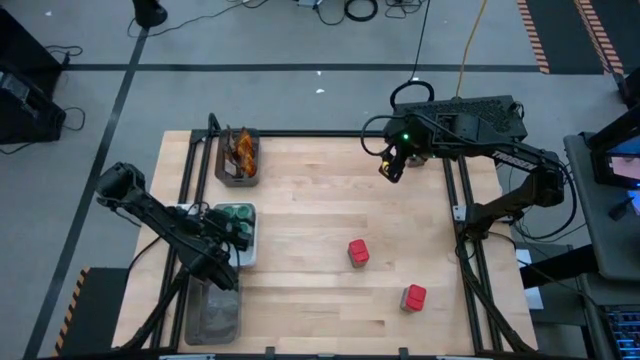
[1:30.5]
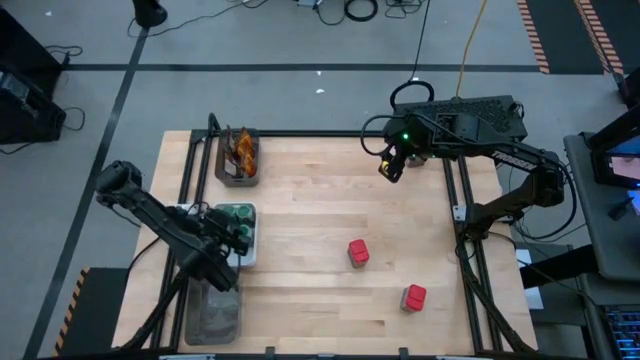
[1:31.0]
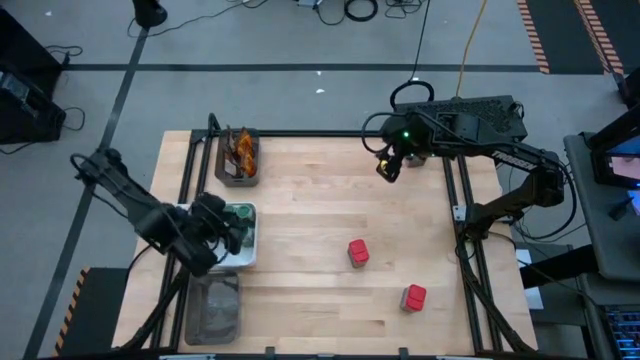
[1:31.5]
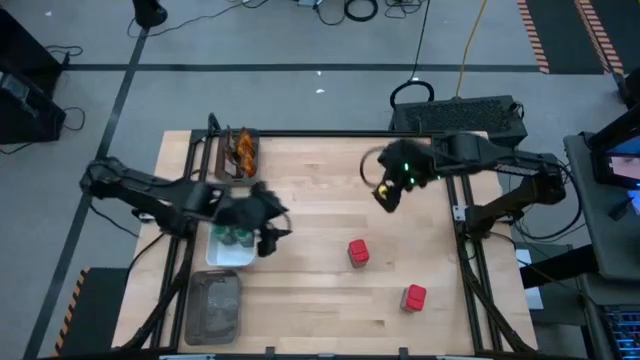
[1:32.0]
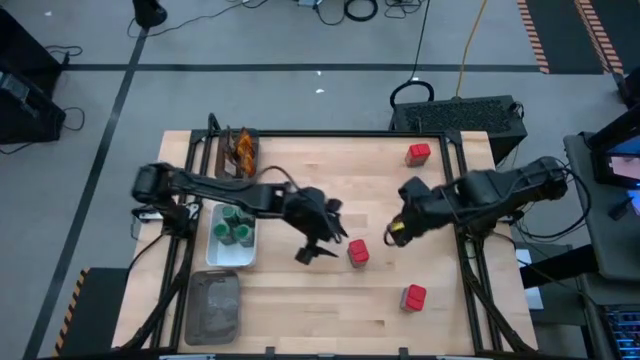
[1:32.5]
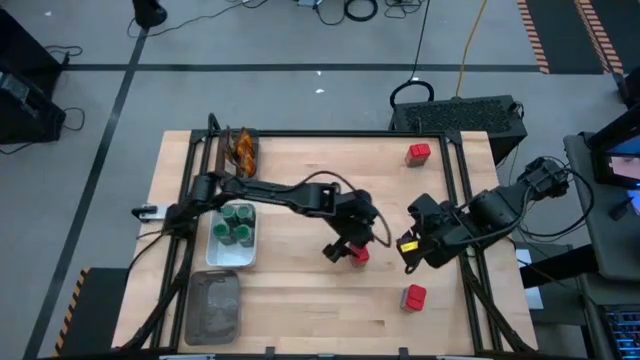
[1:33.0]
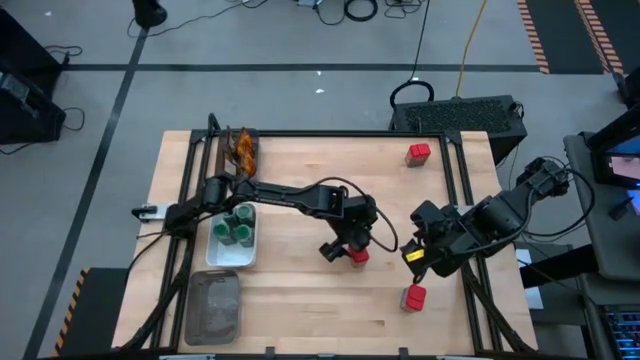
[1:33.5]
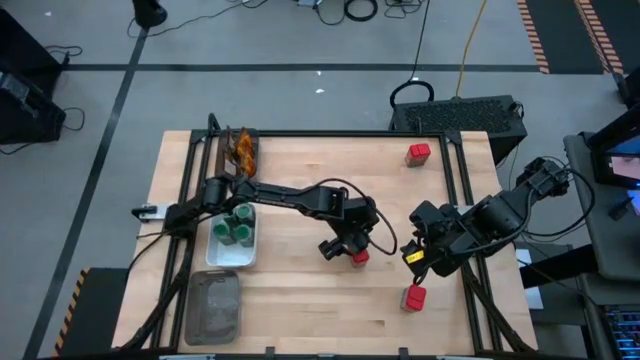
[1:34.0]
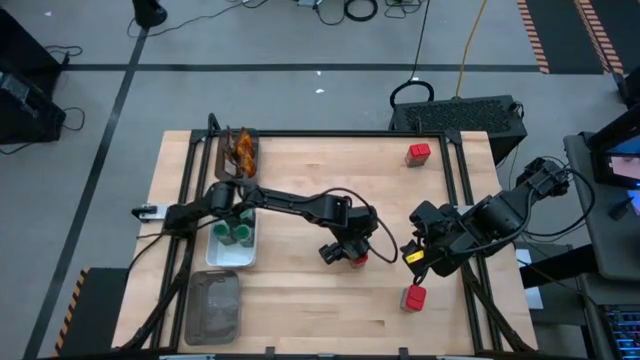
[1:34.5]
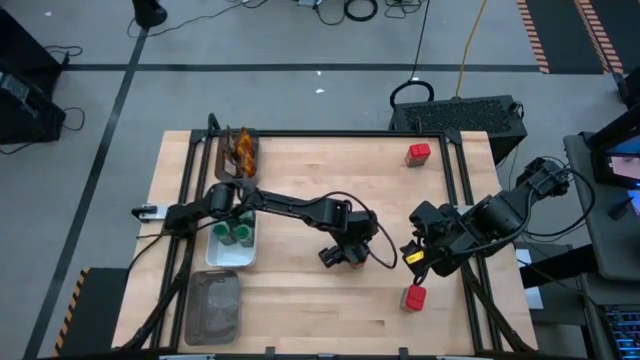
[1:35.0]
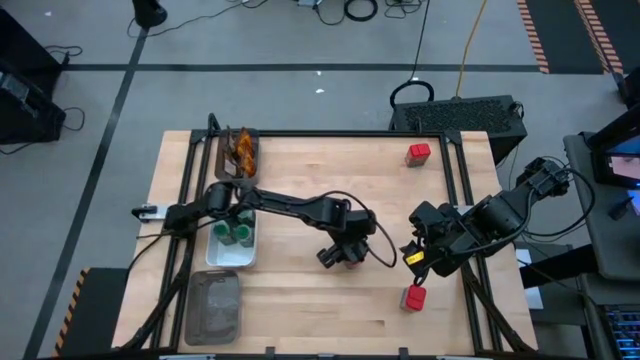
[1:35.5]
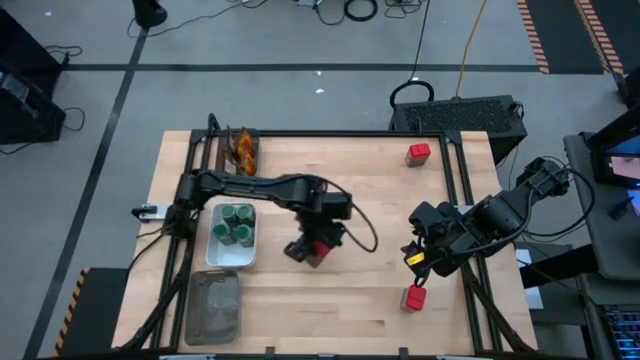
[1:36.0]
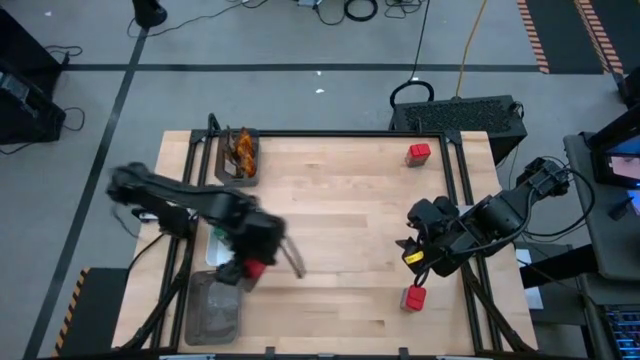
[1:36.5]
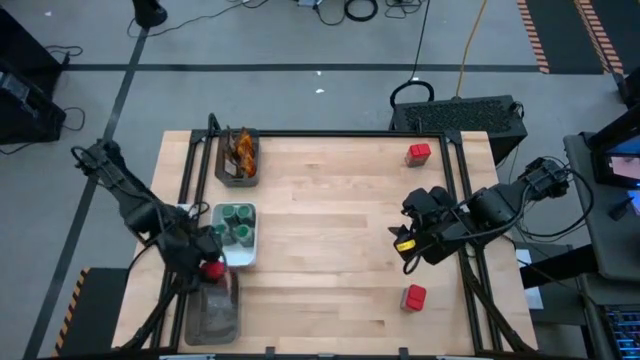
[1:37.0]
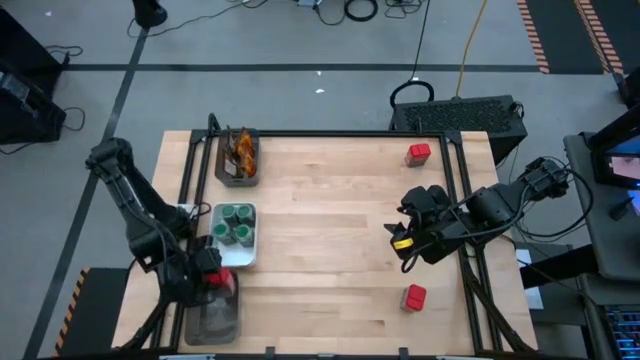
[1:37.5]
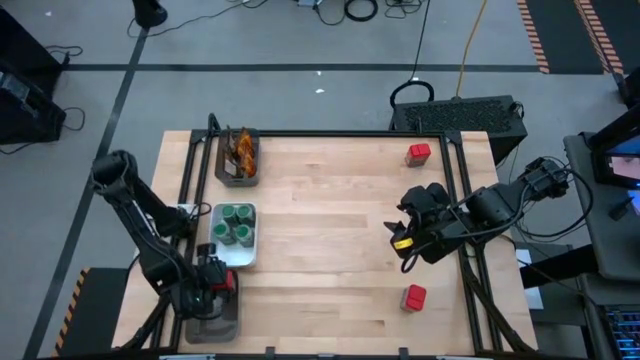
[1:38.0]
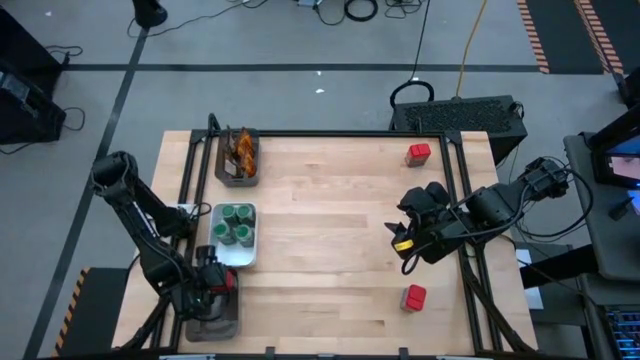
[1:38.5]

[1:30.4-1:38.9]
Task: Sort spices by type
Put the middle red seasoning can into the bottom black bin

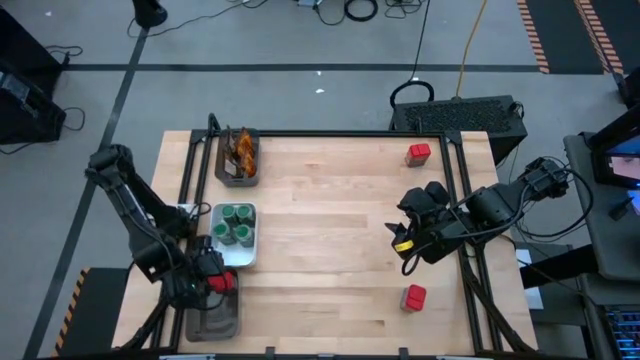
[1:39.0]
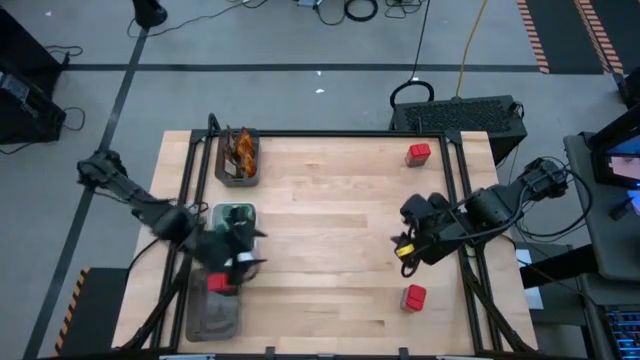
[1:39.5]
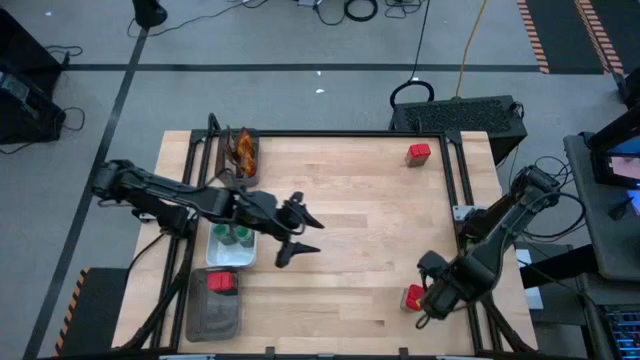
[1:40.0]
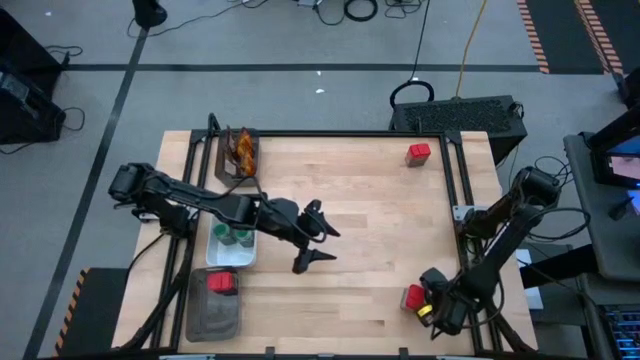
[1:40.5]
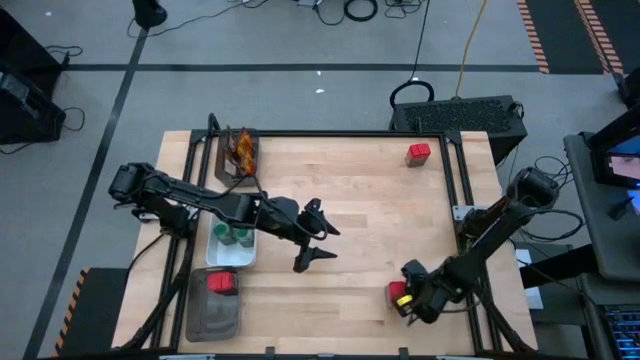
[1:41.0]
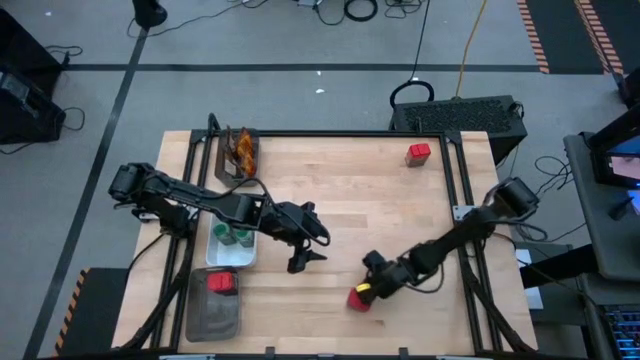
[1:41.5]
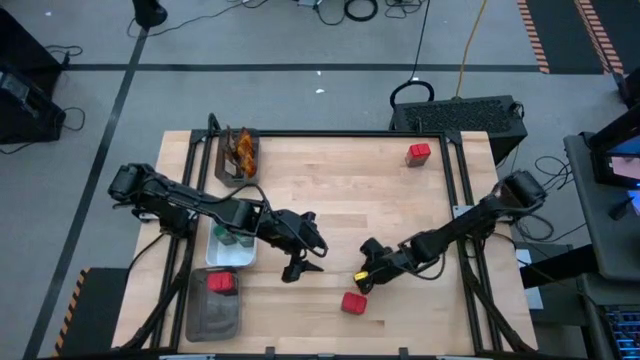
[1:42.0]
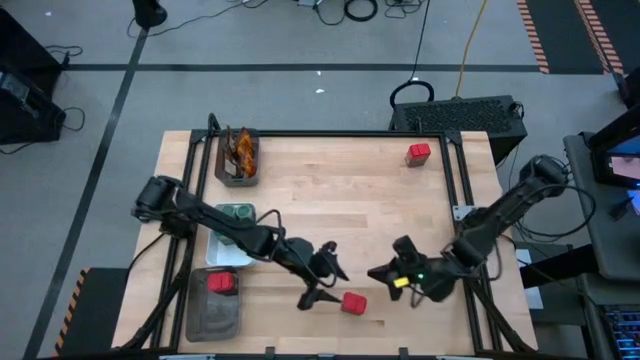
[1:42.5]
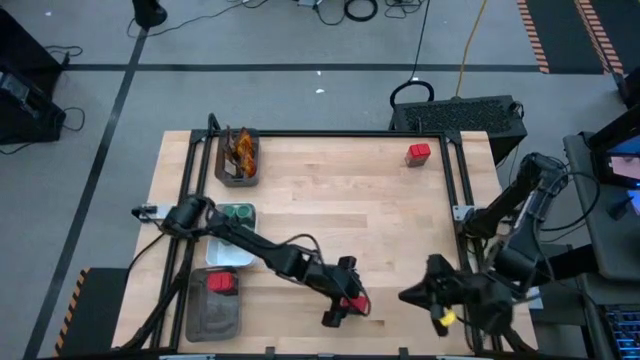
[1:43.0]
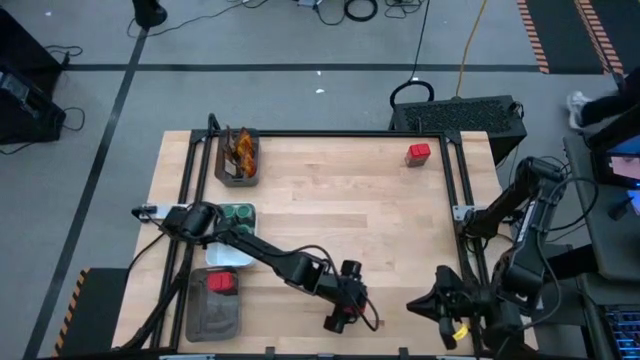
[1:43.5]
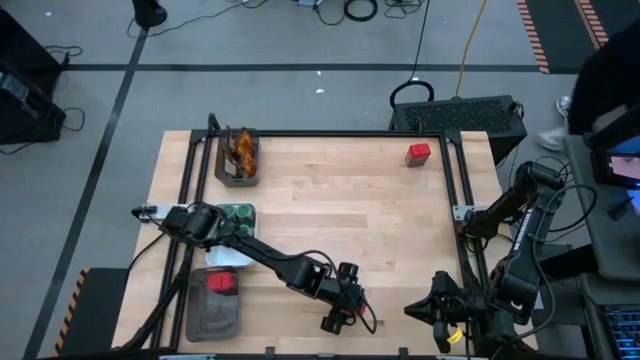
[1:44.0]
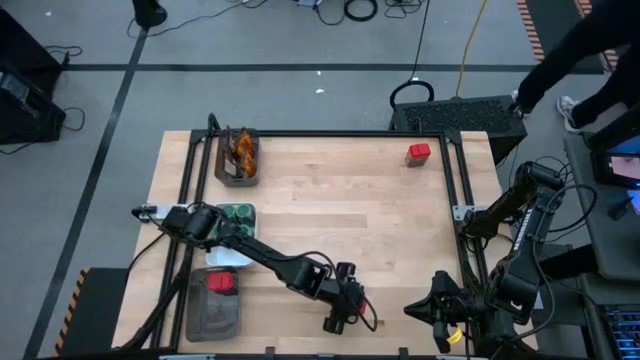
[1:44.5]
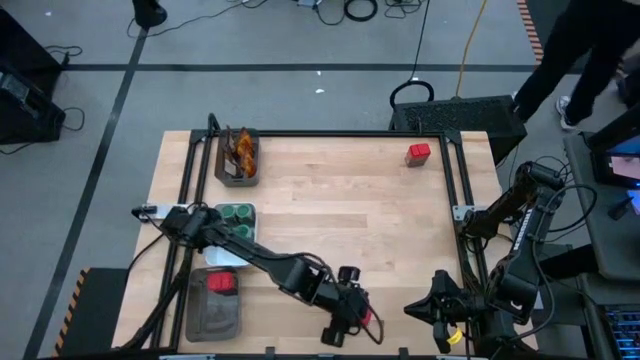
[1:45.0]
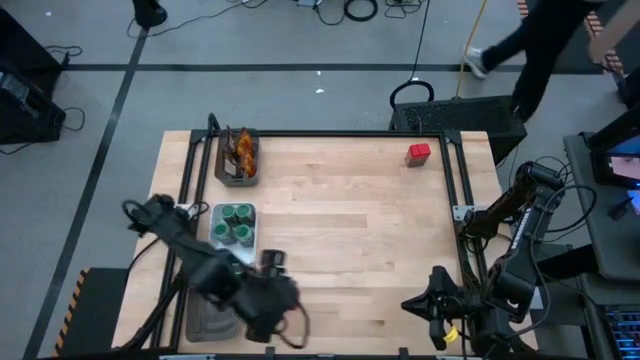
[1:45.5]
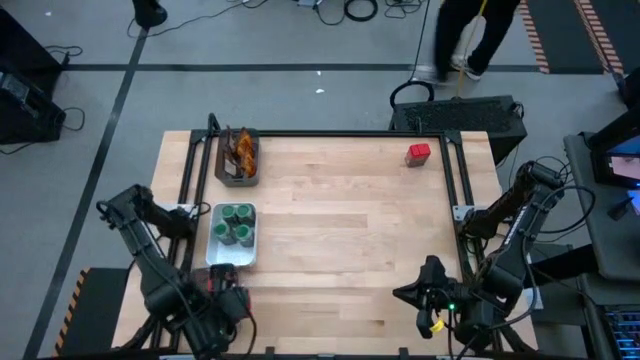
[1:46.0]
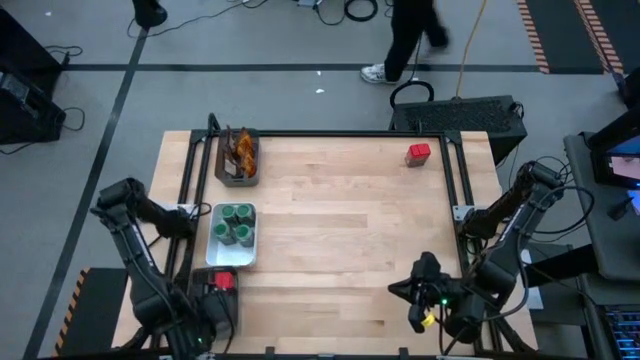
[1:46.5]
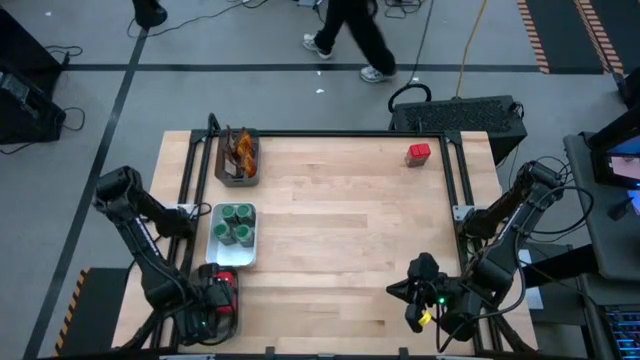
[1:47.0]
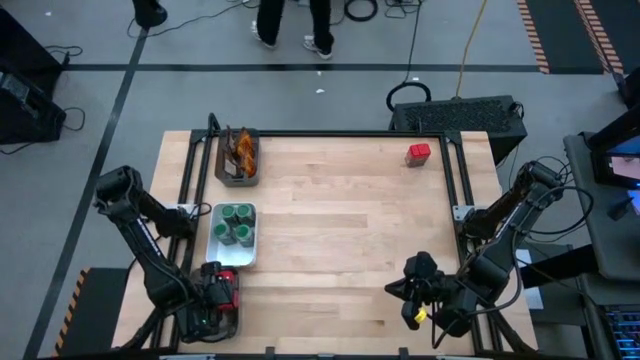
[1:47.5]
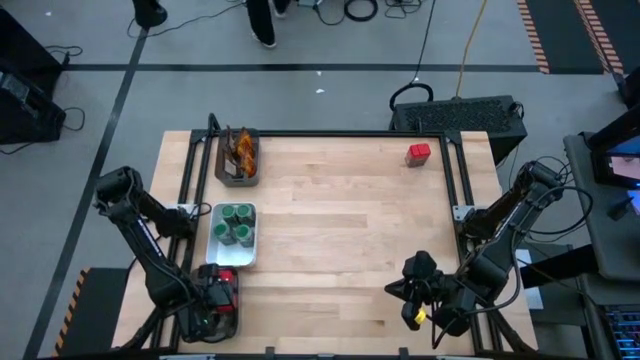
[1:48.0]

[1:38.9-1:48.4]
Put the bottom red seasoning can into the bottom left black bin

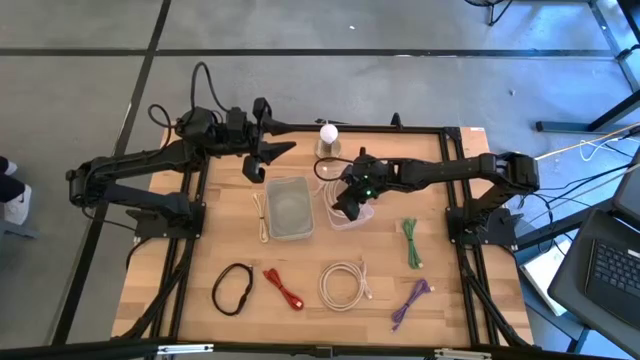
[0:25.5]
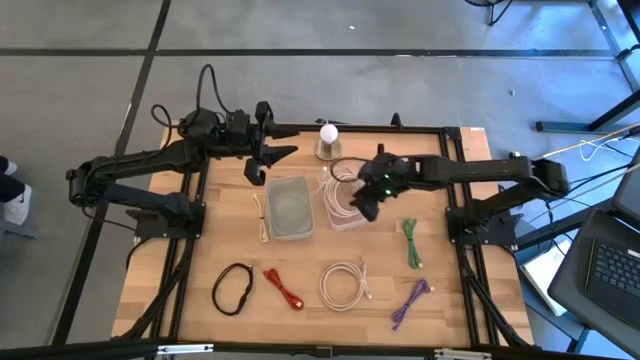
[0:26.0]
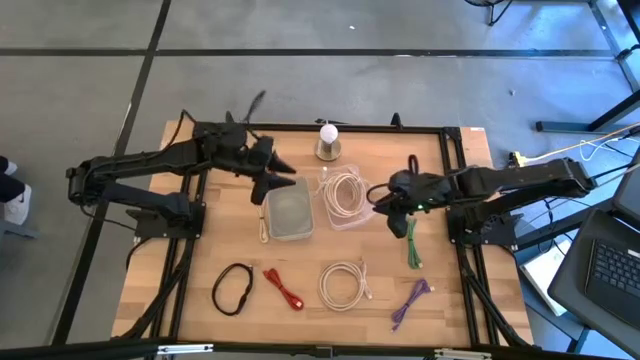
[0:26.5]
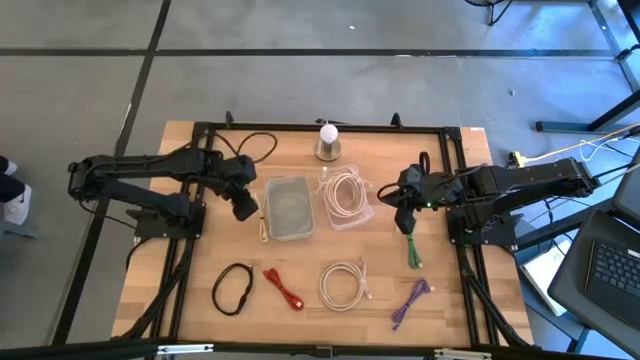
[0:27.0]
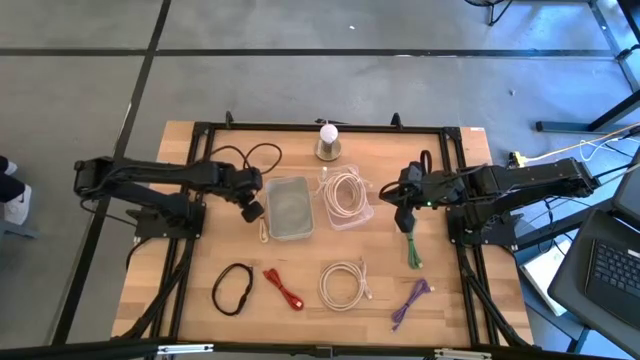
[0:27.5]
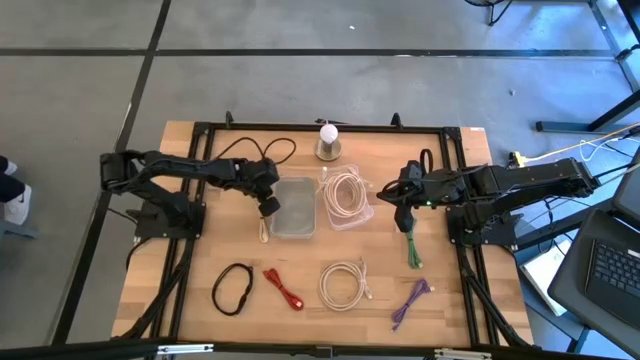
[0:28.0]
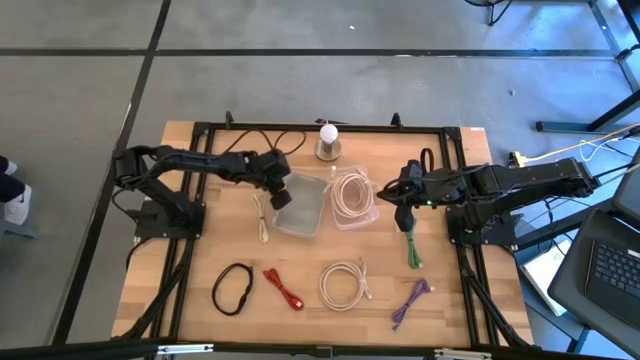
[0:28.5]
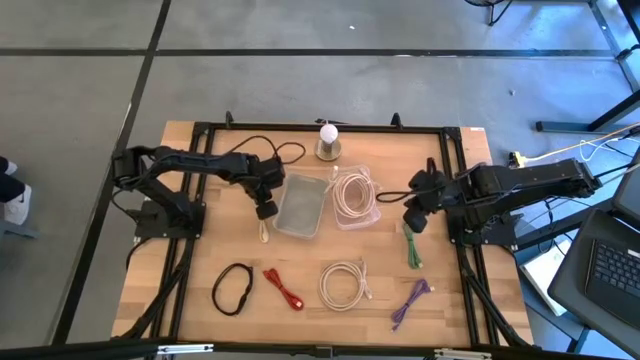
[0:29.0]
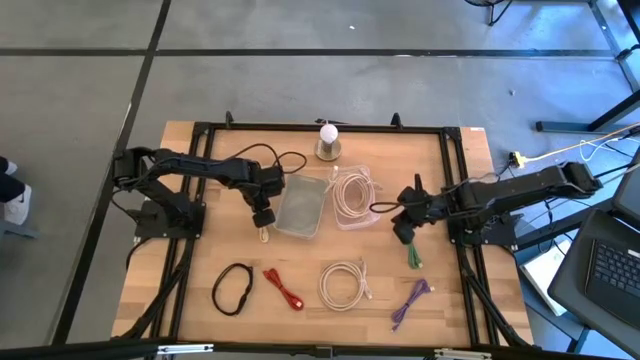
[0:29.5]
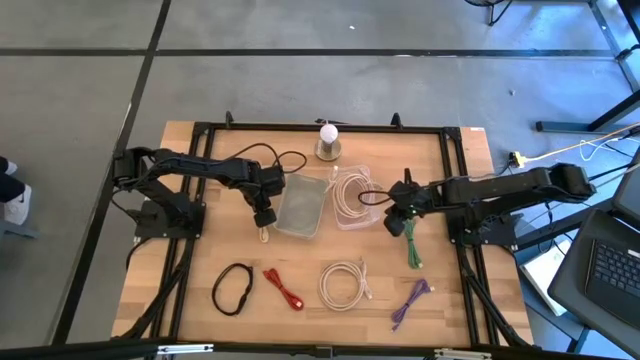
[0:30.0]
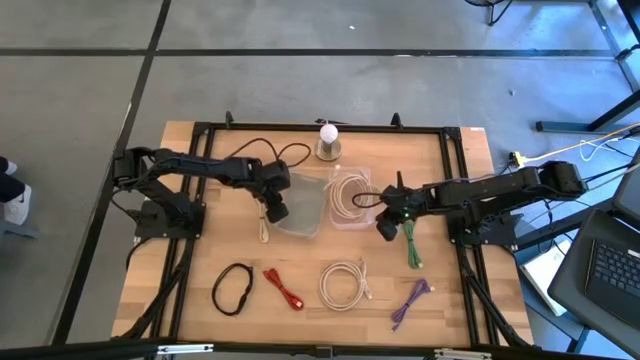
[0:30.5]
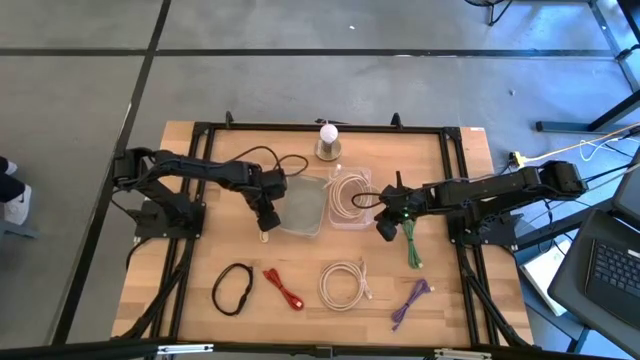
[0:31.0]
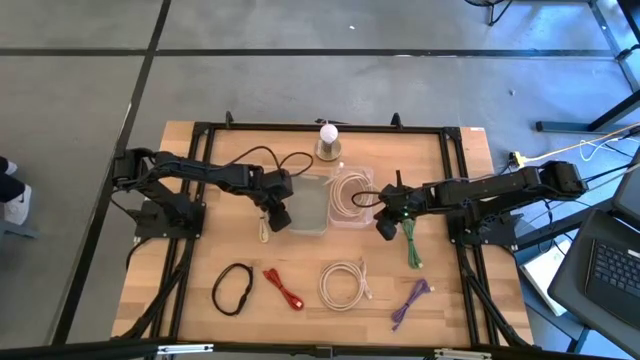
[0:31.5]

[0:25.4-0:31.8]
Task: Pick and place USB-C Cables
Adjust the bins
